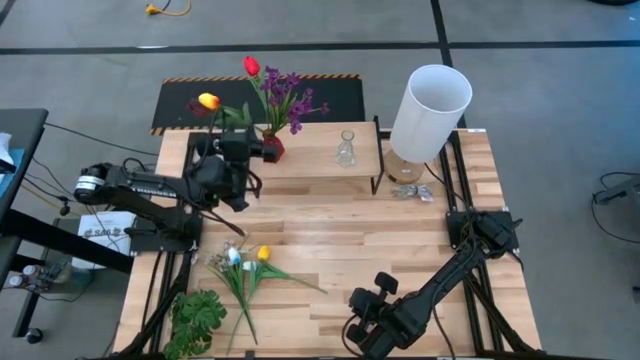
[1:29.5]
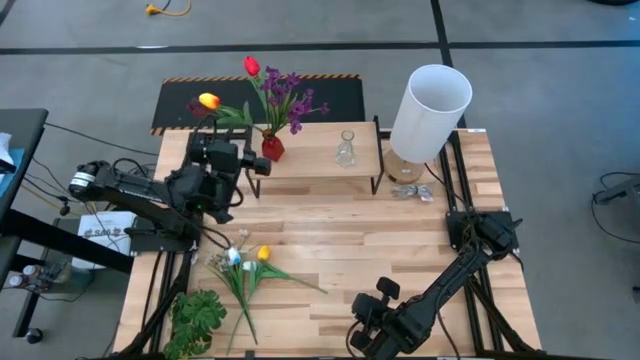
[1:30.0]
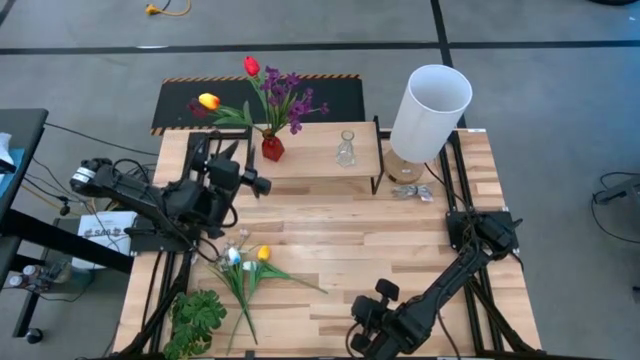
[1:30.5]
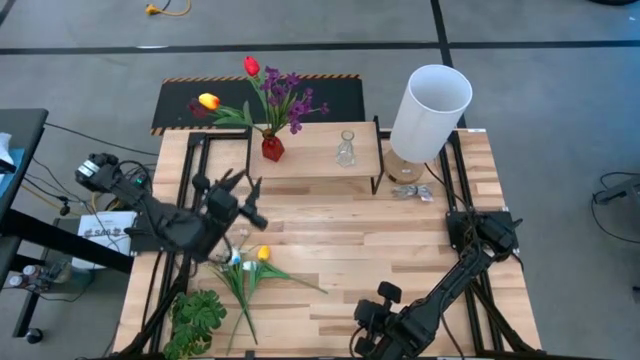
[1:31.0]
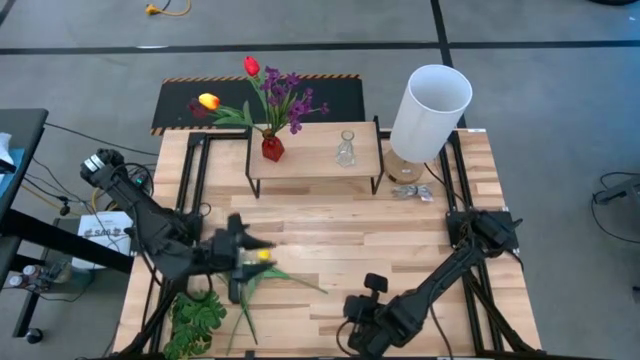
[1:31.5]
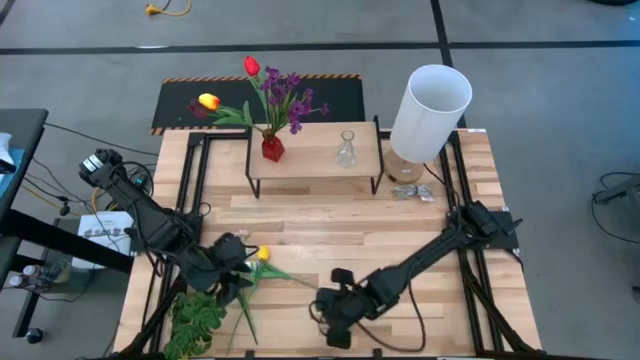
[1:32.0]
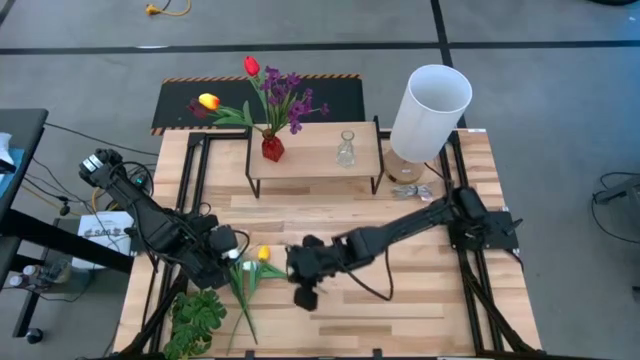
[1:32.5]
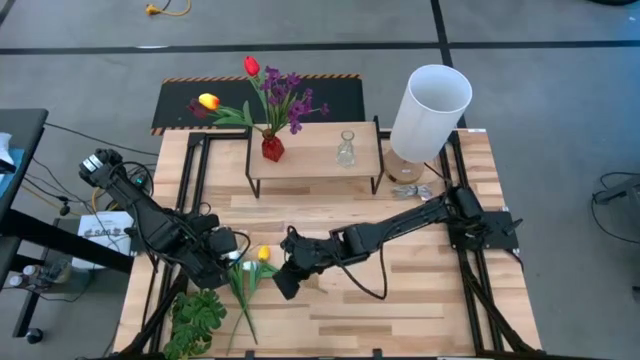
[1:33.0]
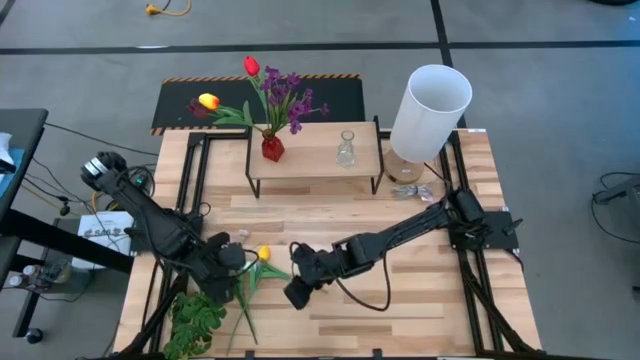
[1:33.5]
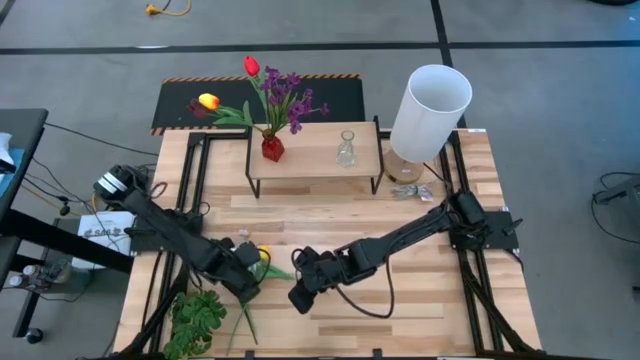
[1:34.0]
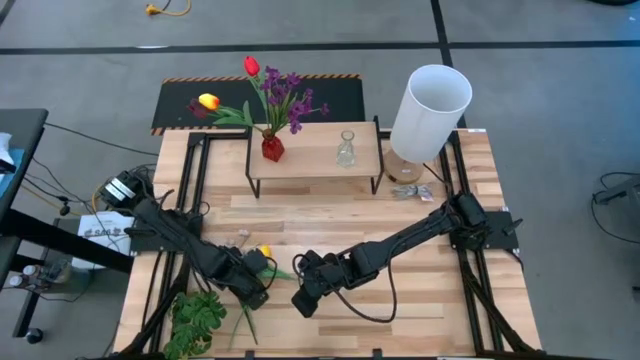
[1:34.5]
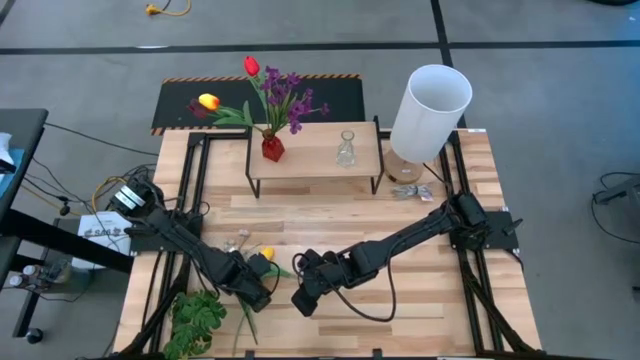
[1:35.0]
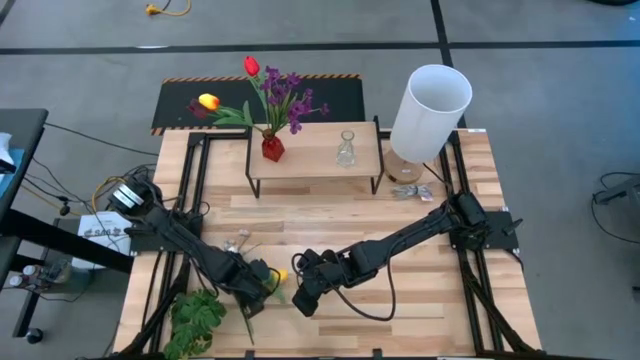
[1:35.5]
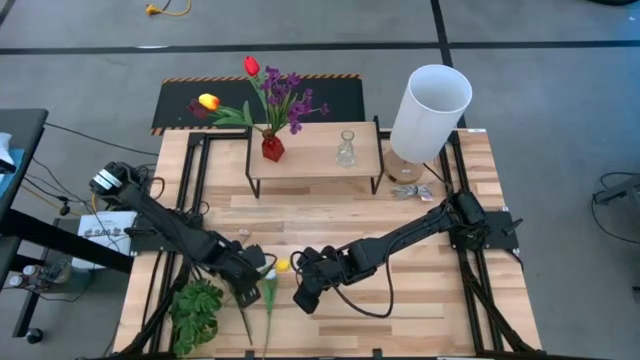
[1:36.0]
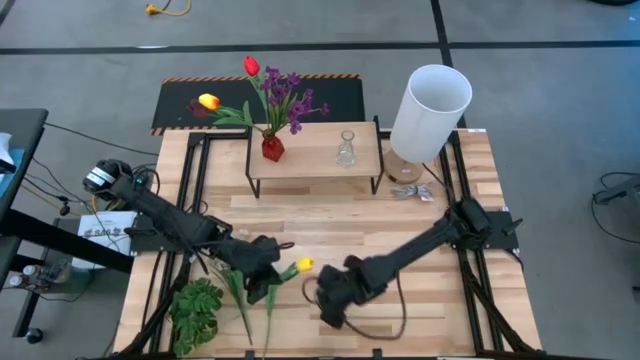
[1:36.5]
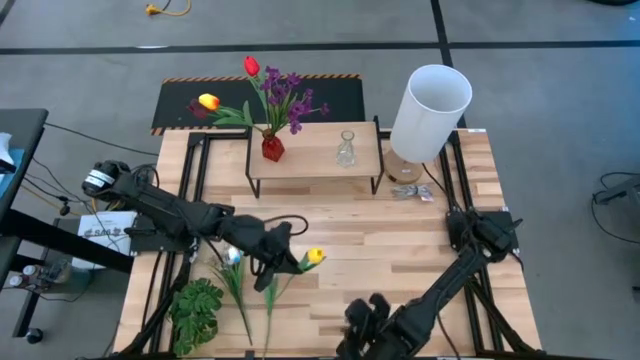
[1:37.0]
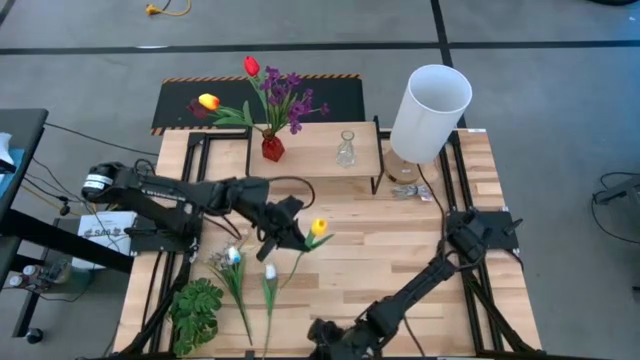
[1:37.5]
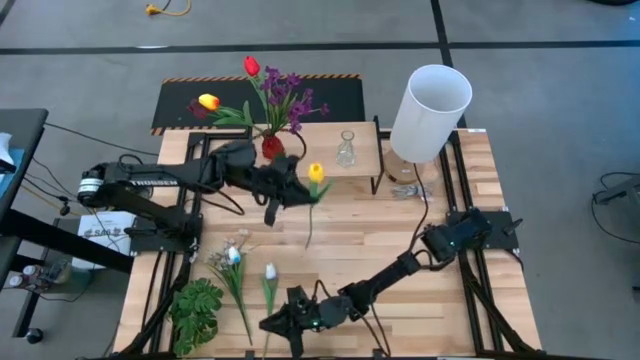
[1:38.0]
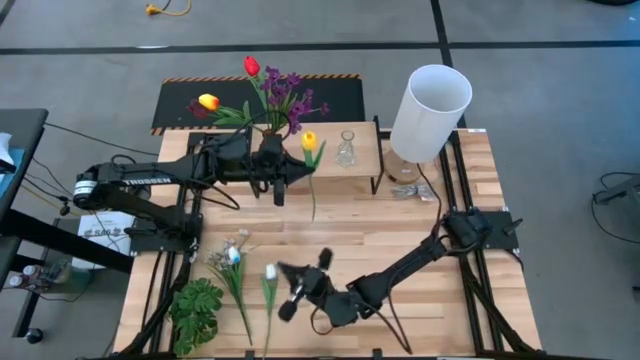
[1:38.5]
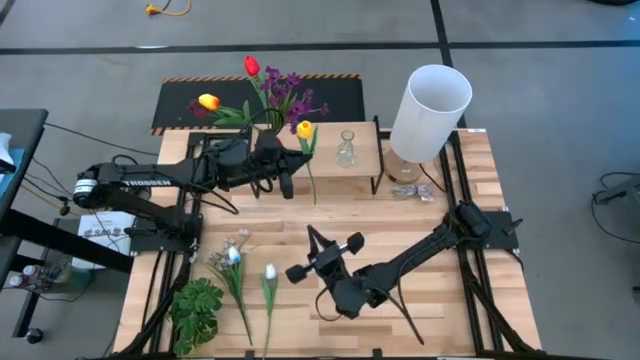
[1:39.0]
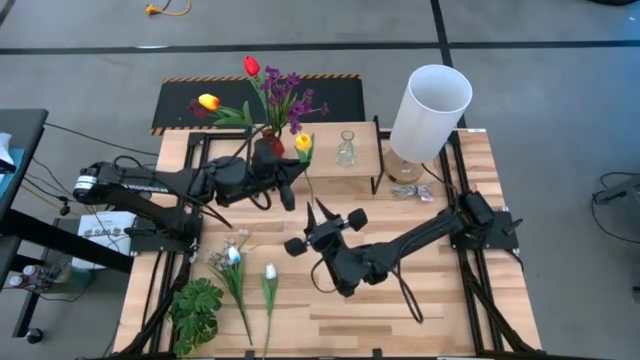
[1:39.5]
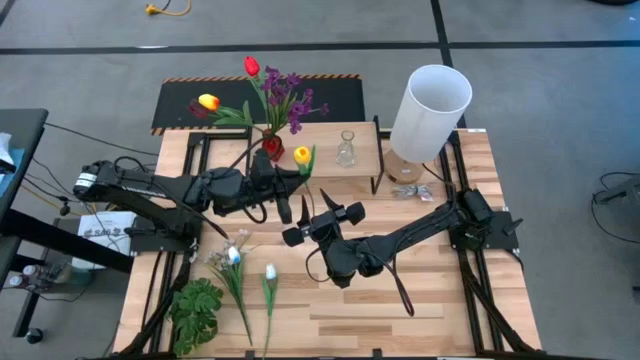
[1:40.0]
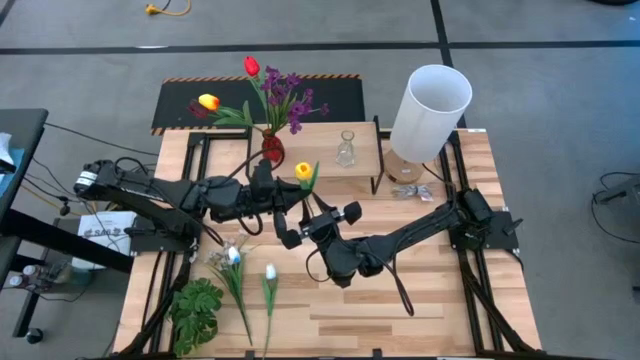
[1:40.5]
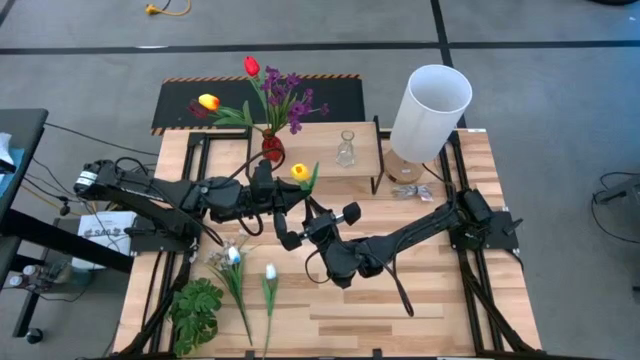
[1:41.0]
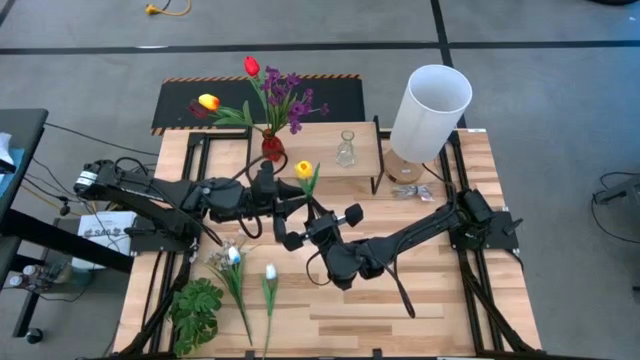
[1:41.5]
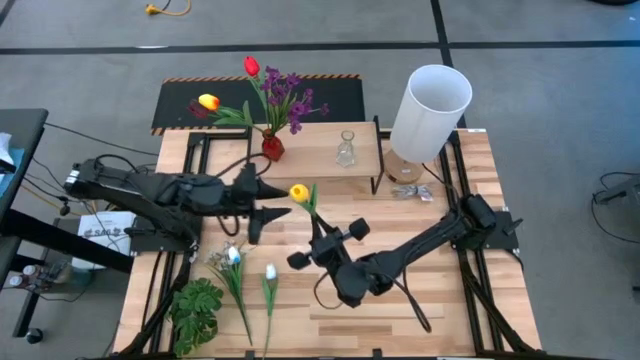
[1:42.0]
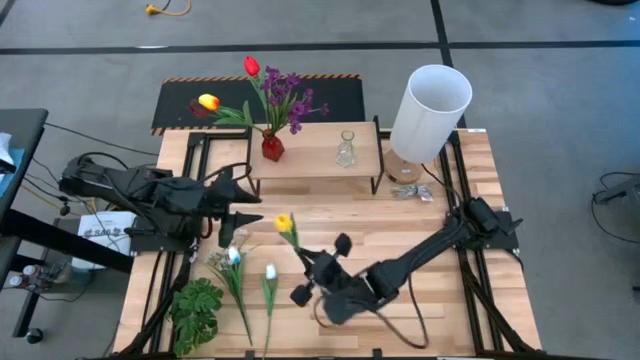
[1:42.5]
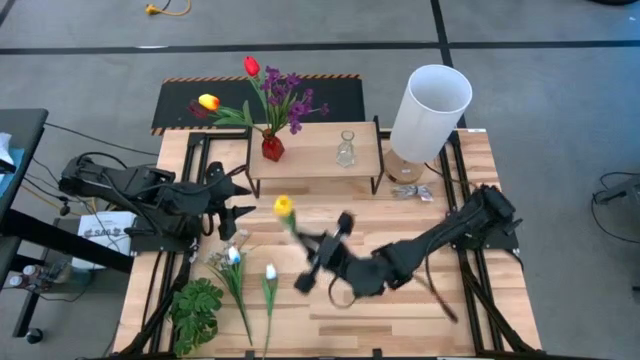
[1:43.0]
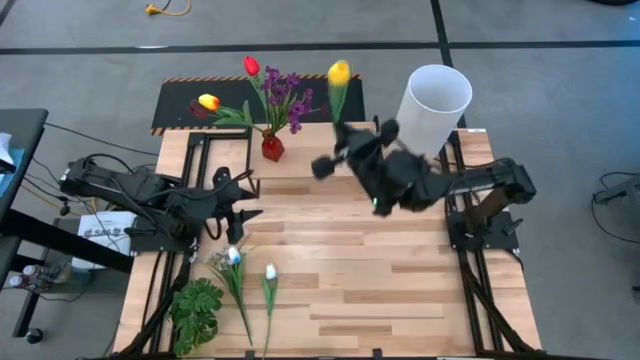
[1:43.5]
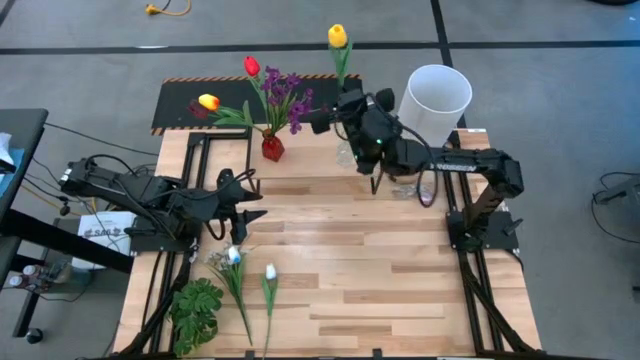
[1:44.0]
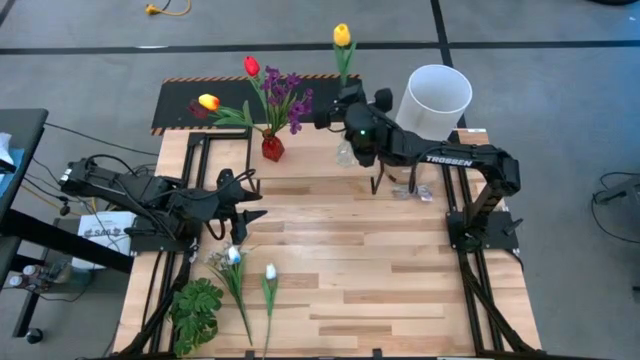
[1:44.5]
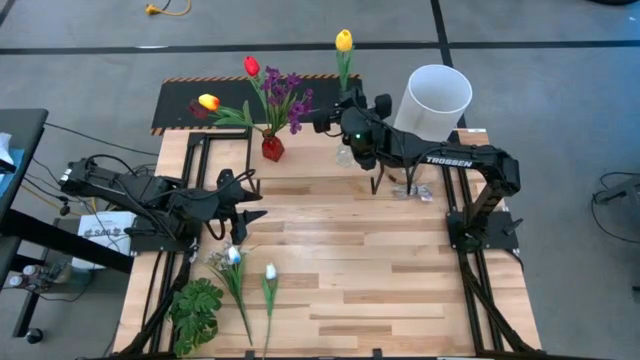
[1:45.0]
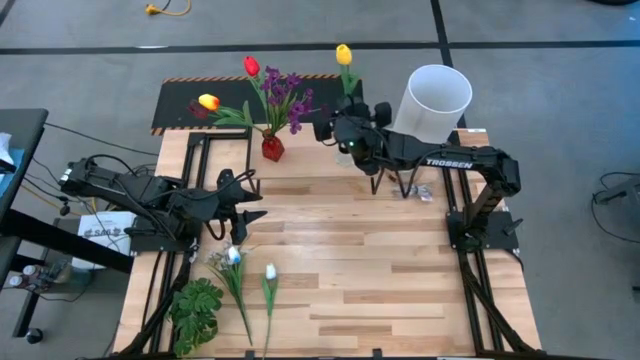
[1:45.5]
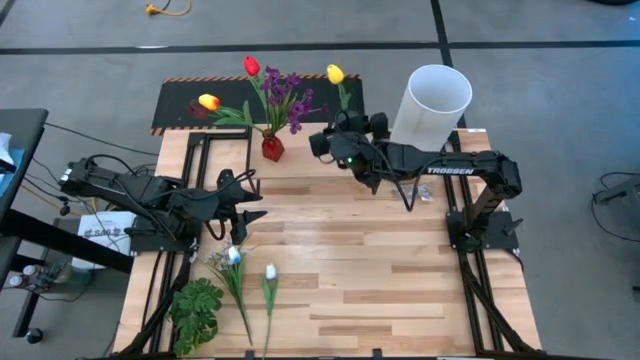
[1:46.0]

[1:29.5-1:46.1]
Task: Pick and place flowers into a vace then onto a shelf
Put the yellow flower into the transparent vase on the shelf

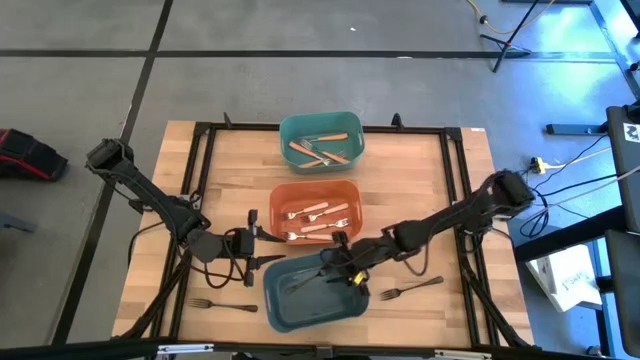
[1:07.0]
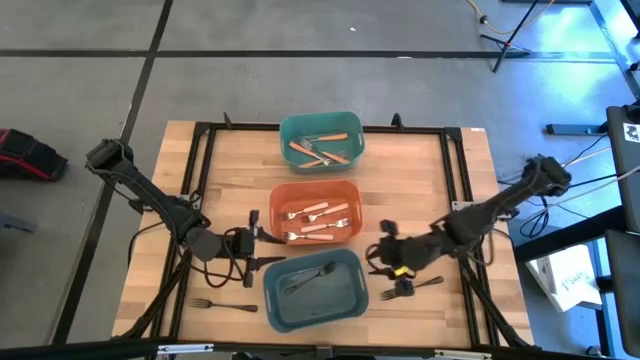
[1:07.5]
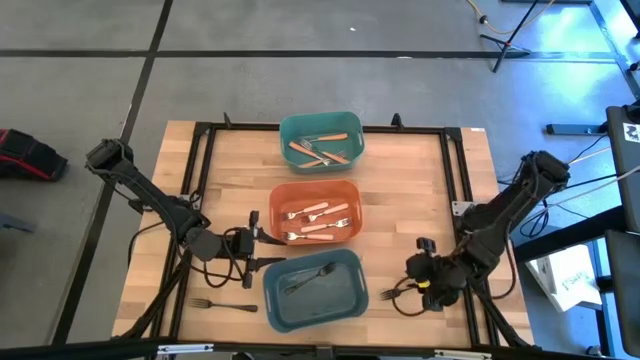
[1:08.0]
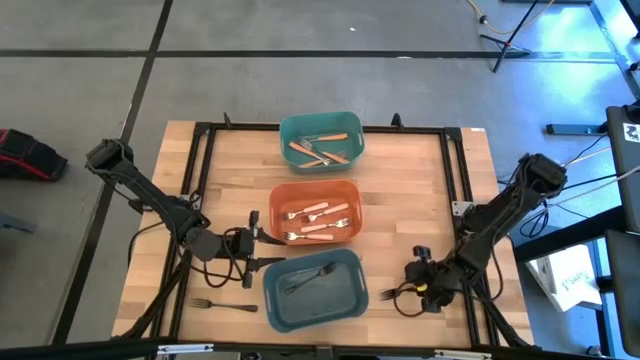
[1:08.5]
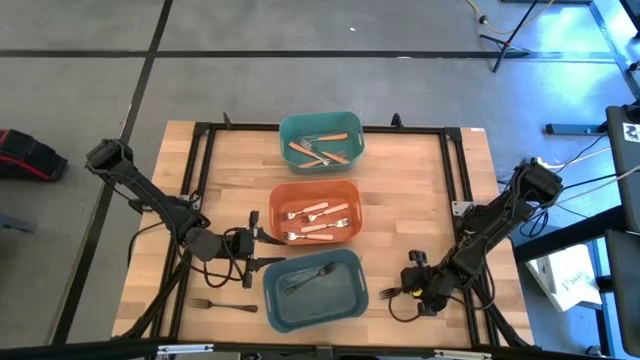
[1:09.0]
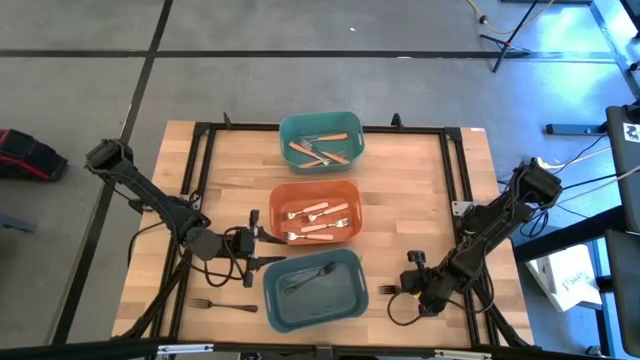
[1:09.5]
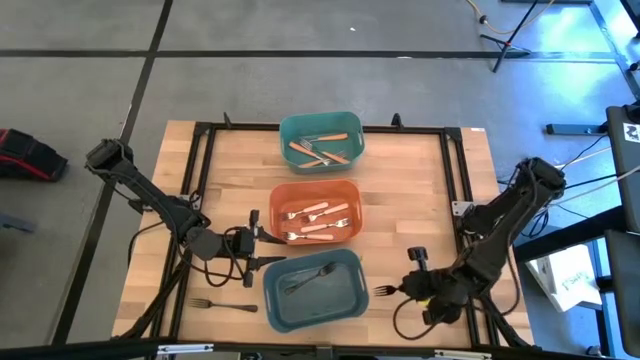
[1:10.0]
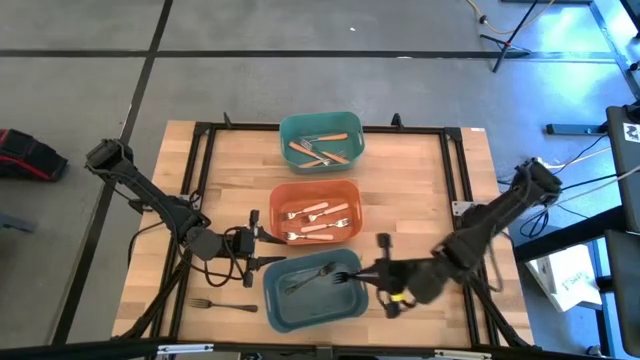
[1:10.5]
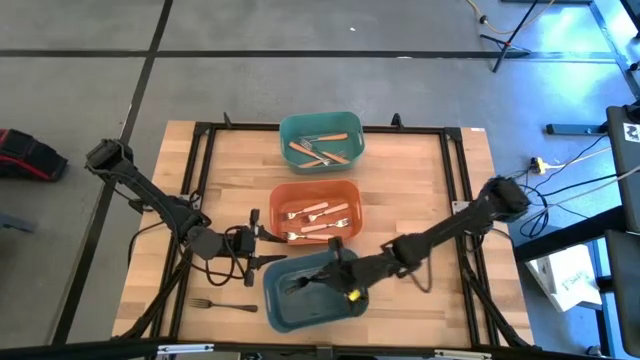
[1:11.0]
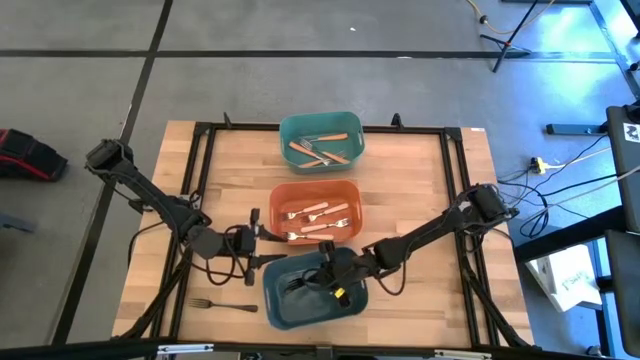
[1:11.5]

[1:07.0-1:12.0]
Task: Sort silverware by color (type)
Put the black fork into the blue bin
